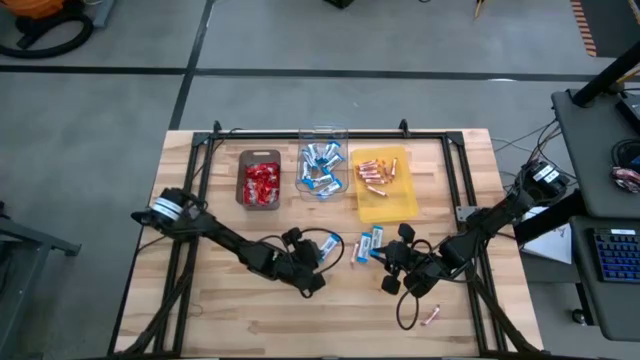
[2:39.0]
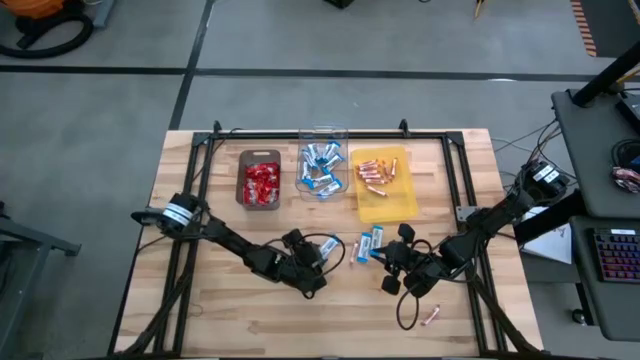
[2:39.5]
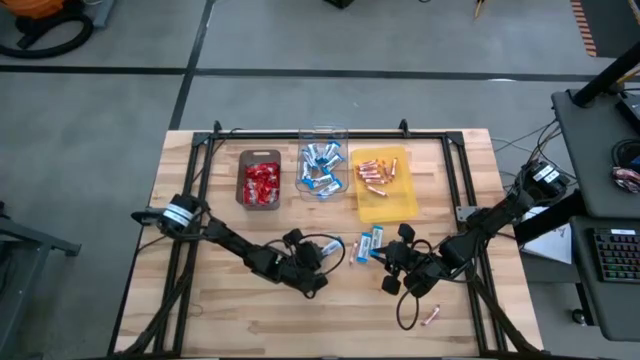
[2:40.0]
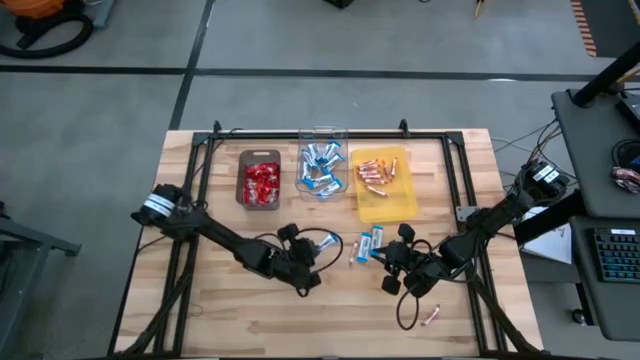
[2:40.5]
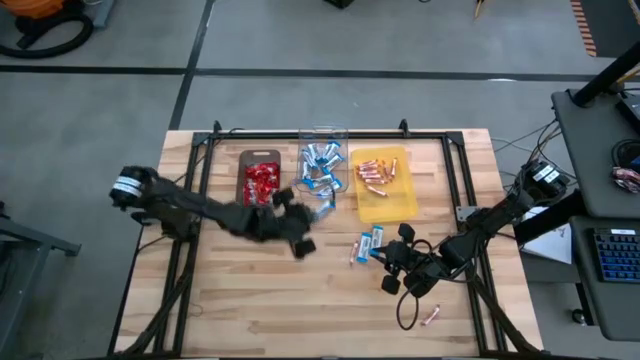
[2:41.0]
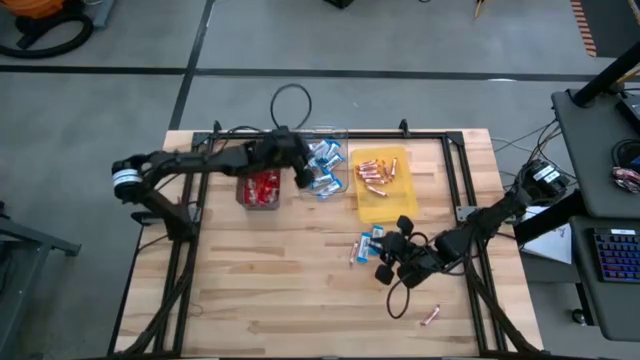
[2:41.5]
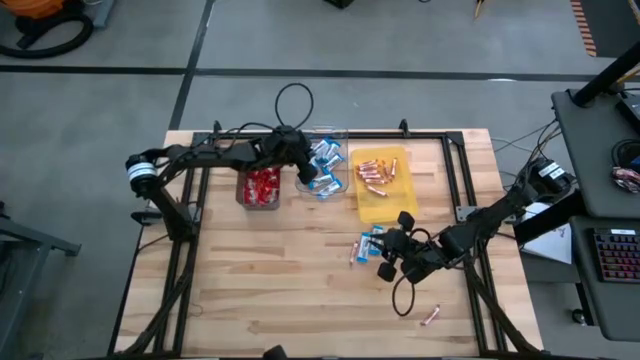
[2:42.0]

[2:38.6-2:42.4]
Task: Sort candy
Put the white chocolate into the transparent bin

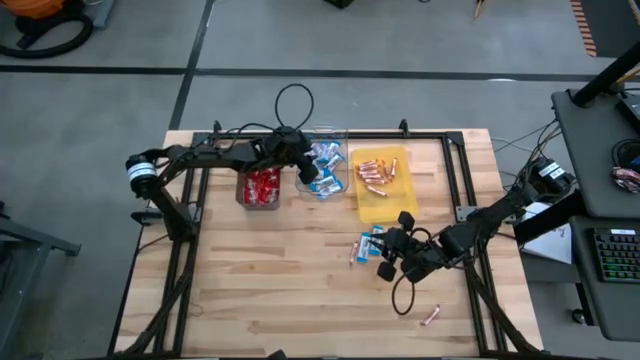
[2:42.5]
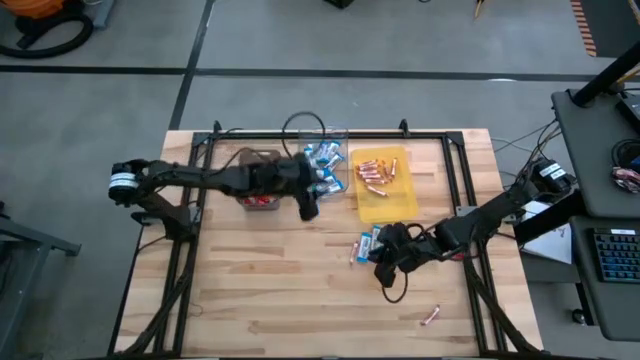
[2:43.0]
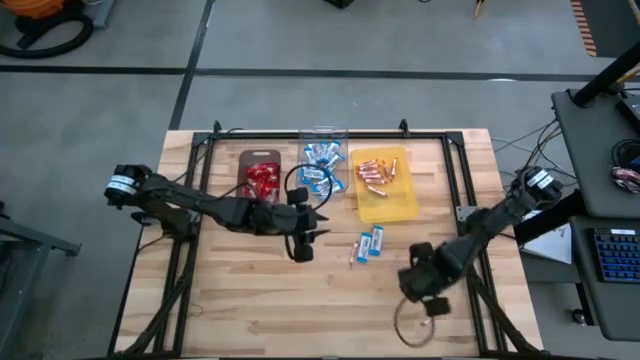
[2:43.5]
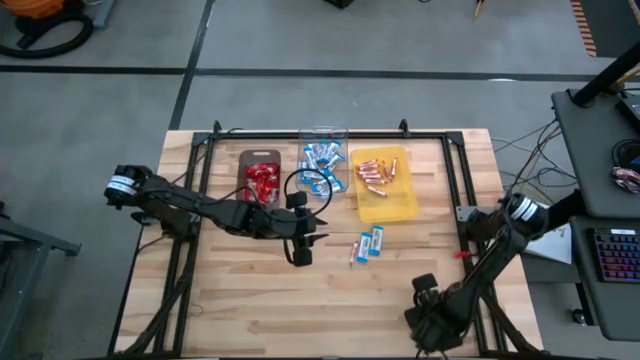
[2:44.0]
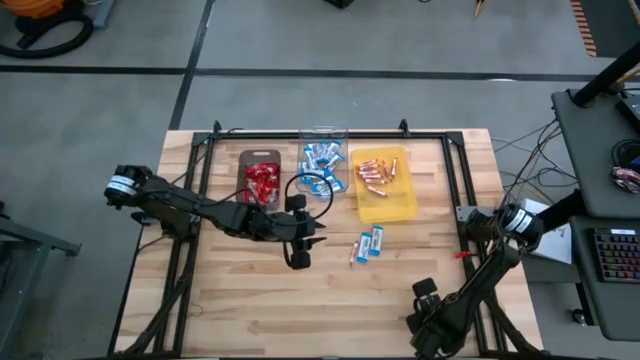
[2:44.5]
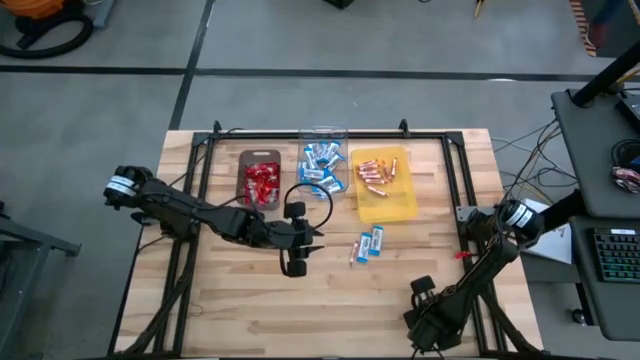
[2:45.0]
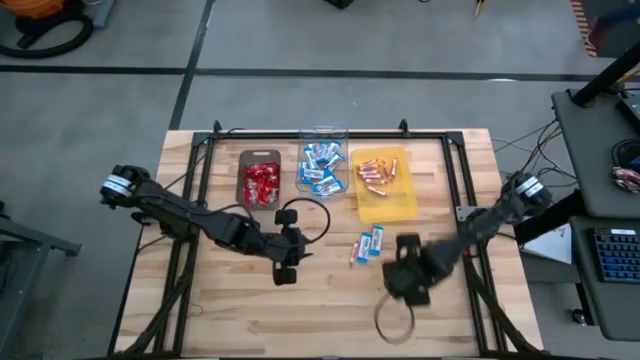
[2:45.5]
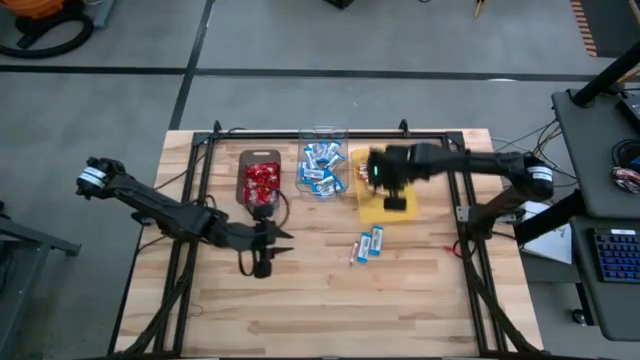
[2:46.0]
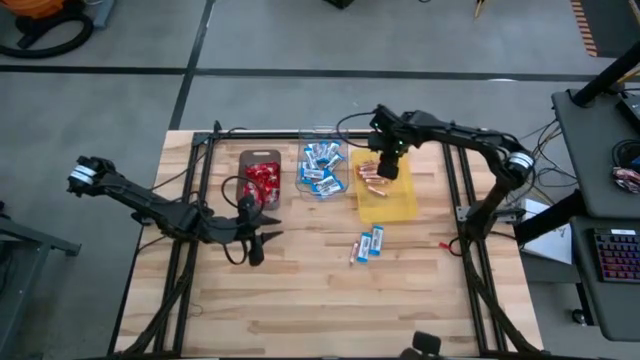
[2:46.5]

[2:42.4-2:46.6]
Put the white-red candy into the yellow bin

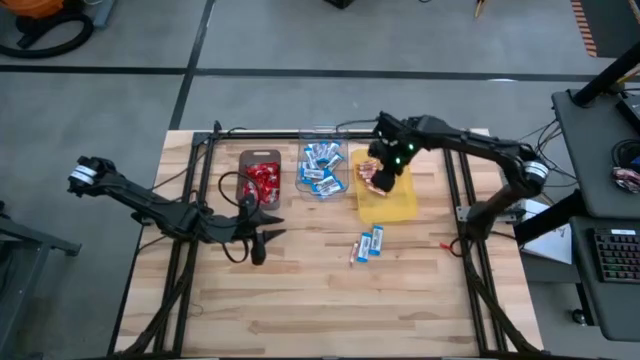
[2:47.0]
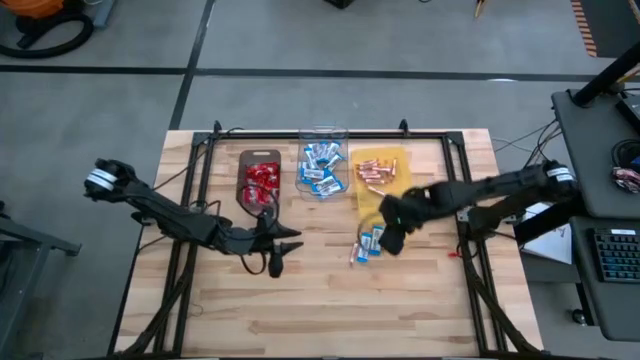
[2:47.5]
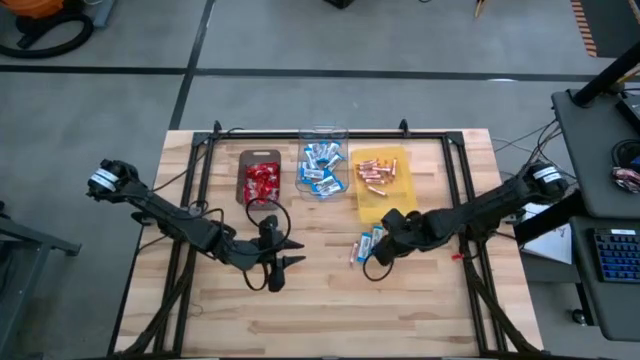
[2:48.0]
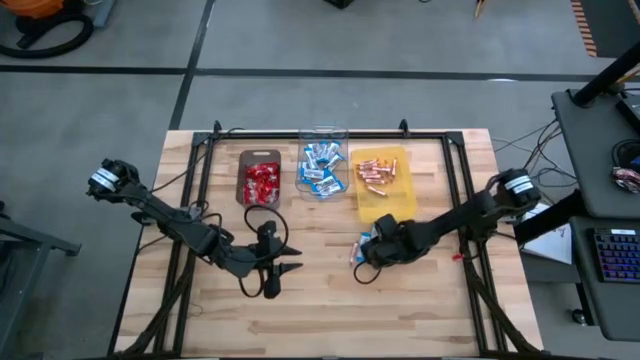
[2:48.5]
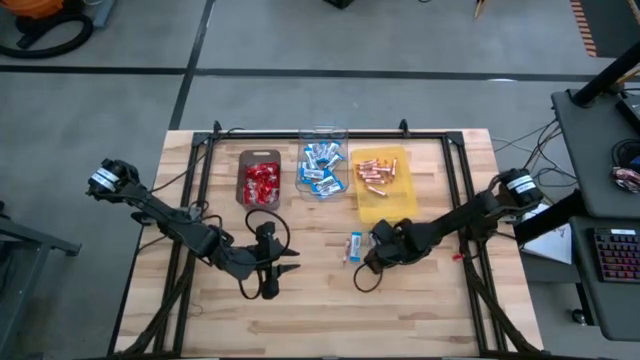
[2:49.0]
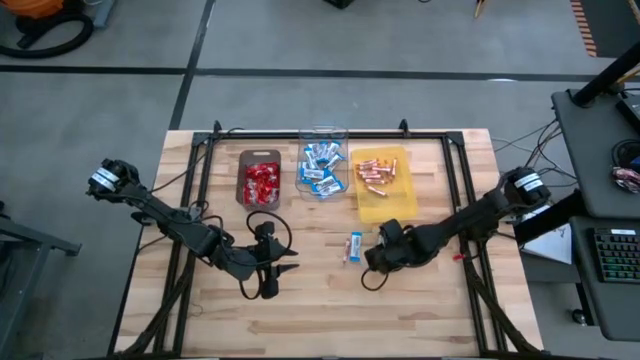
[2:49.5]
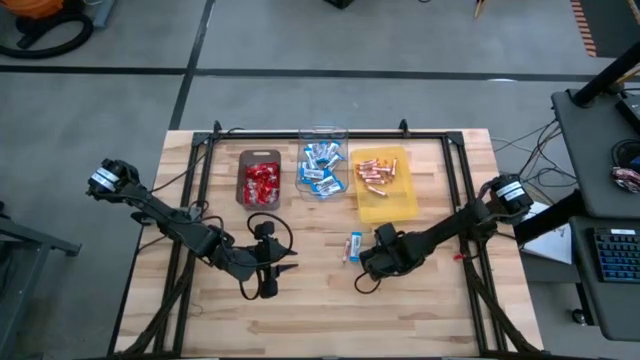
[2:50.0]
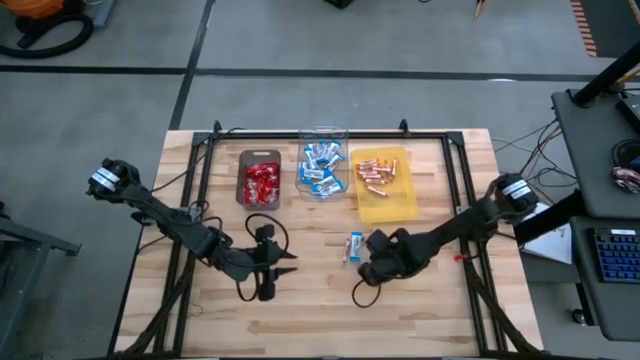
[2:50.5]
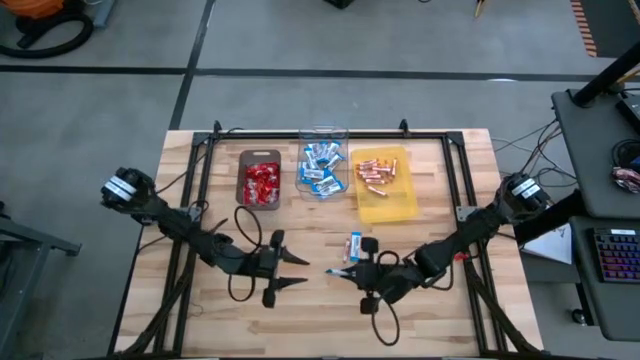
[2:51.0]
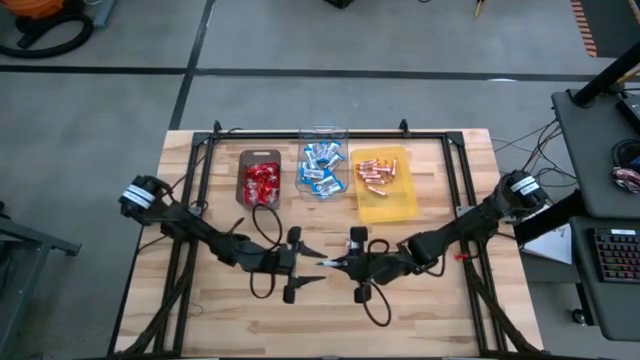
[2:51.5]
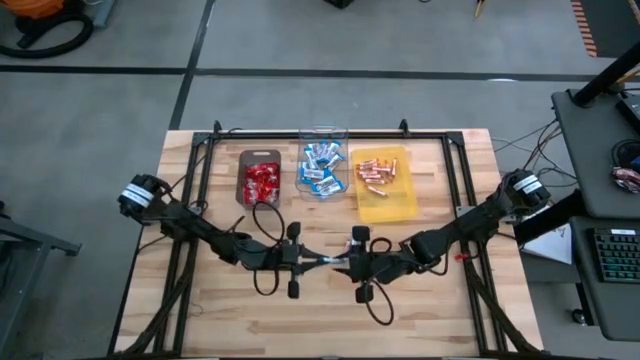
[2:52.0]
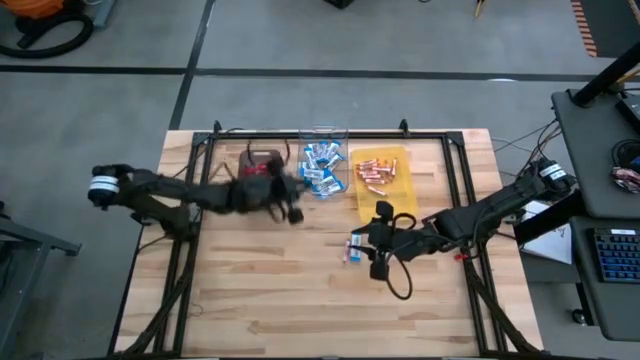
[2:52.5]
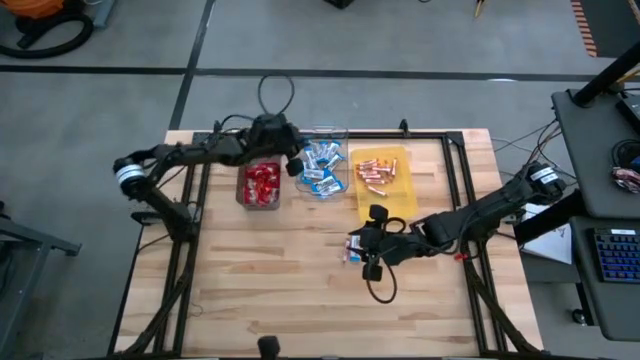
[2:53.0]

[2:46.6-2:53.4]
Put the white chocolate into the transparent bin

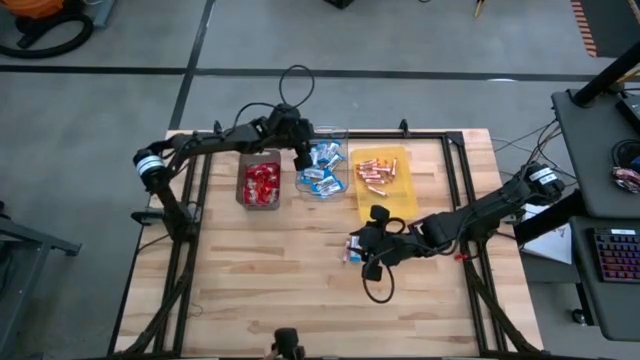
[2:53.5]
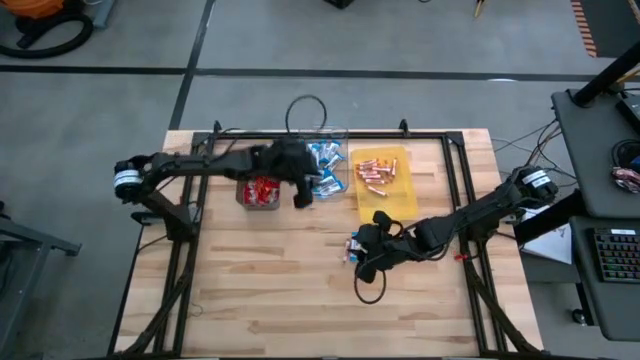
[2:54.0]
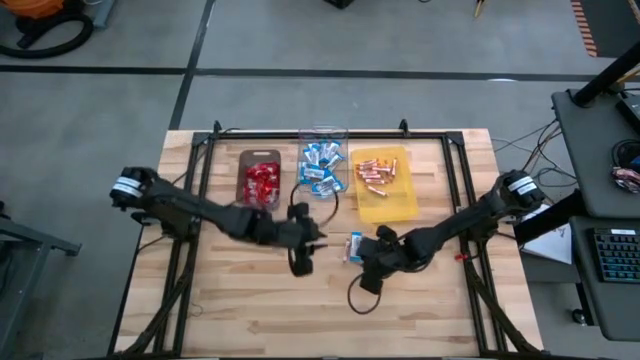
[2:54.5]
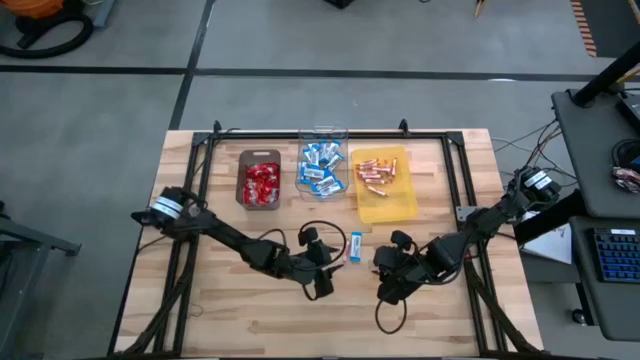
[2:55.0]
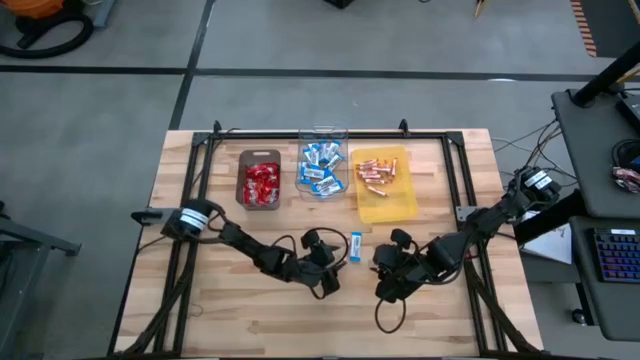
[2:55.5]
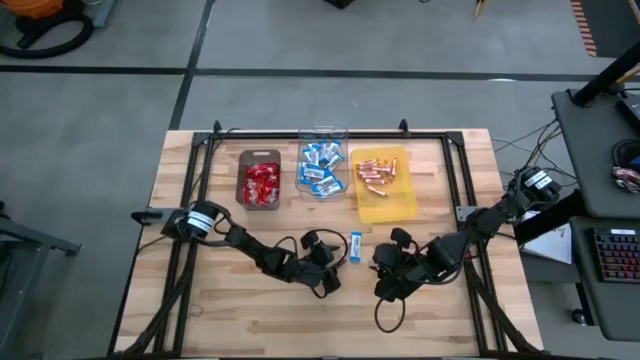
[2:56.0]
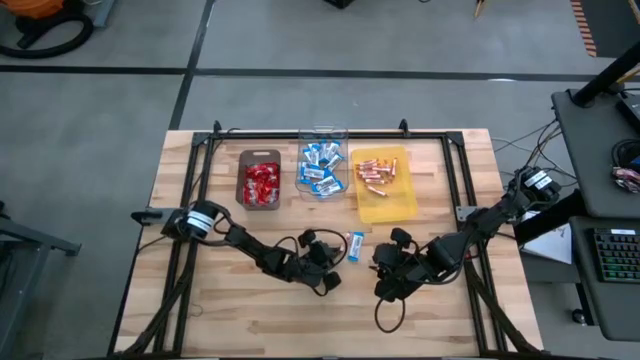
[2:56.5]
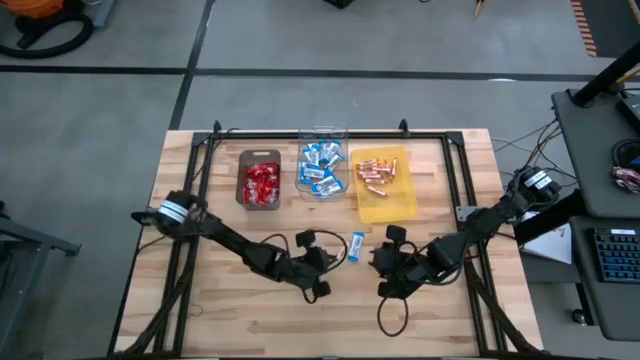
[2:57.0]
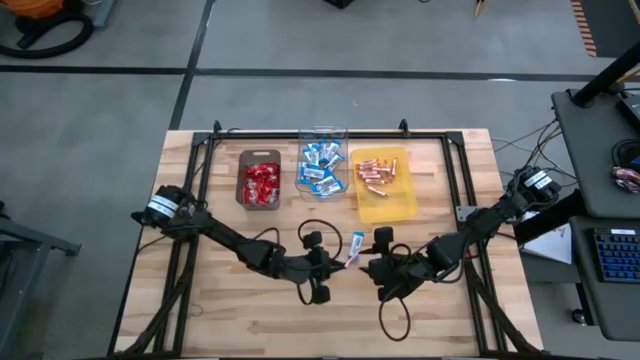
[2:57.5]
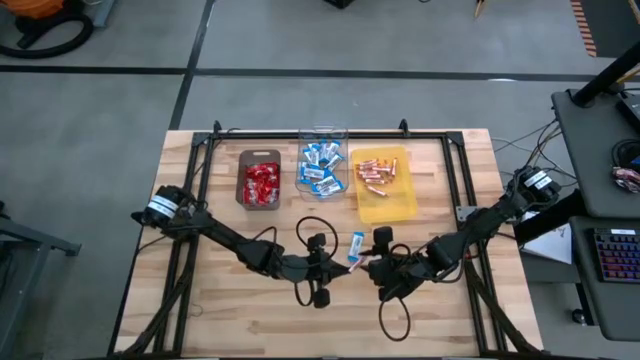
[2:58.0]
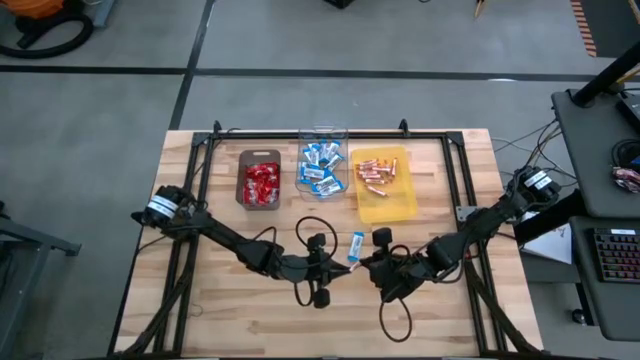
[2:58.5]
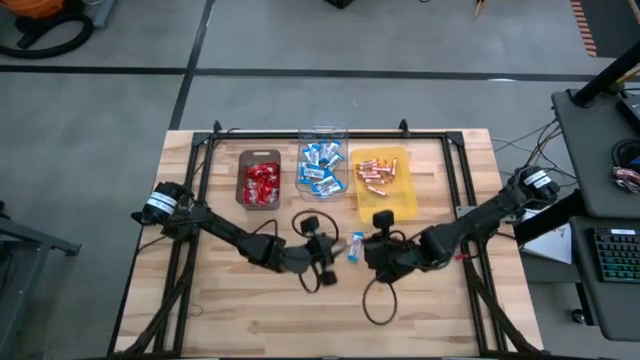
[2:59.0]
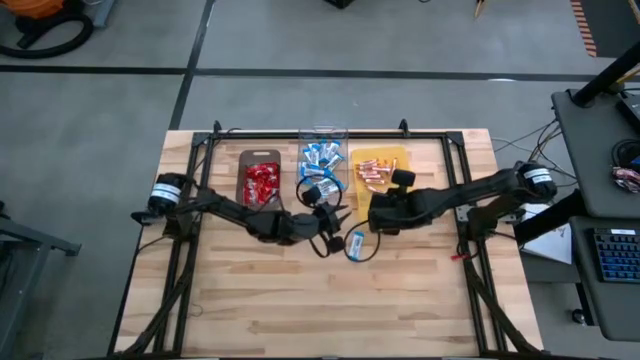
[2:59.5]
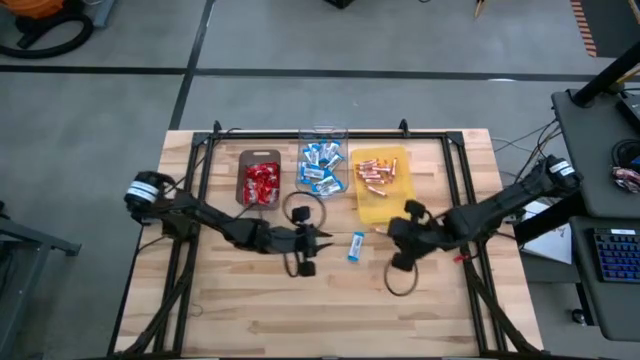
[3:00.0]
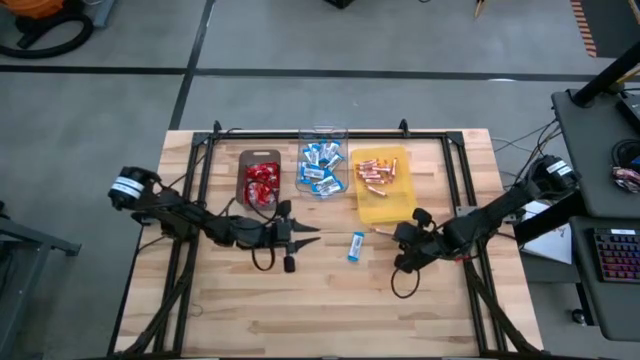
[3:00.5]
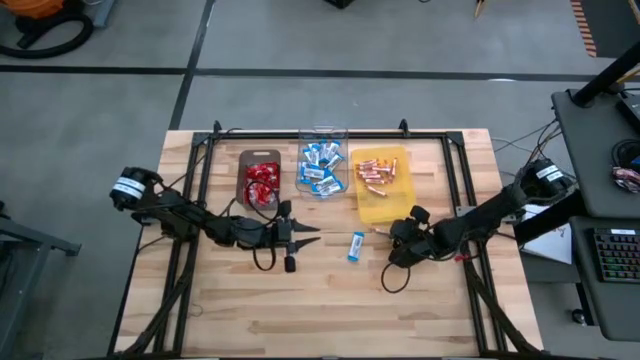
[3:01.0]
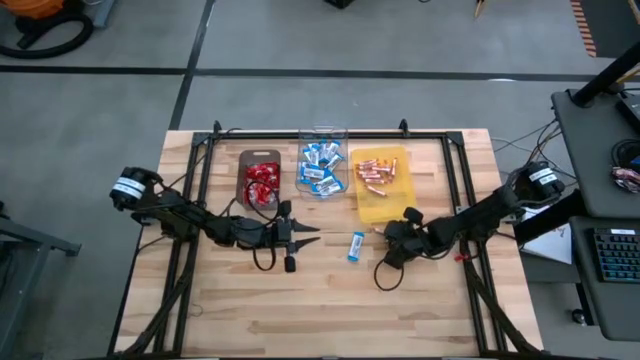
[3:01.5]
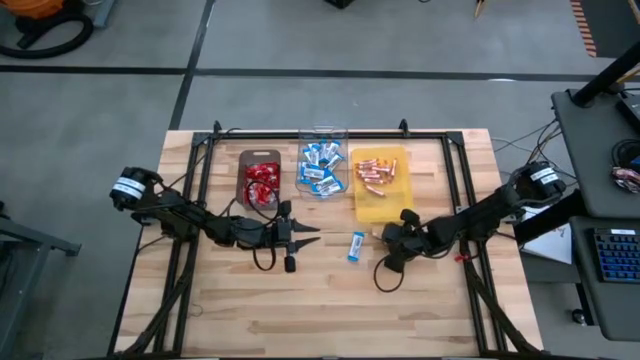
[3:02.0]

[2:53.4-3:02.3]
Put the white-red candy into the yellow bin
